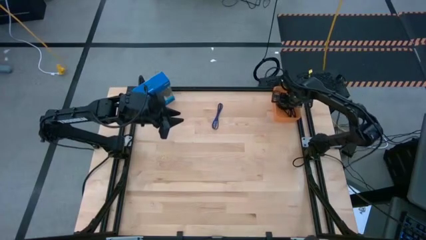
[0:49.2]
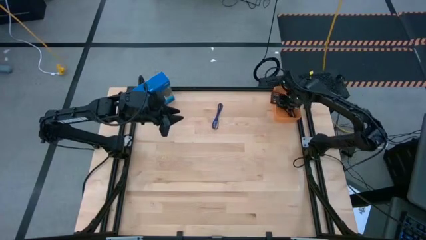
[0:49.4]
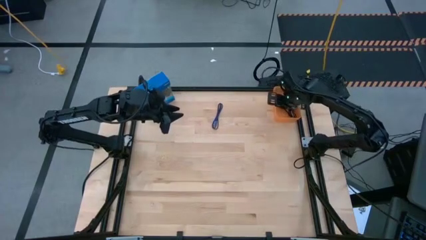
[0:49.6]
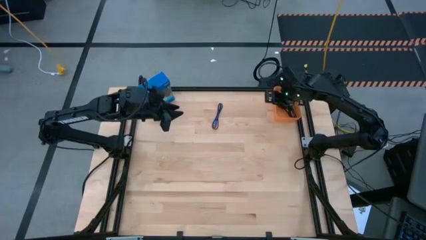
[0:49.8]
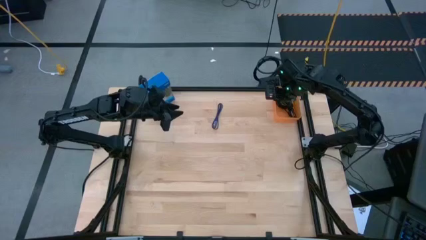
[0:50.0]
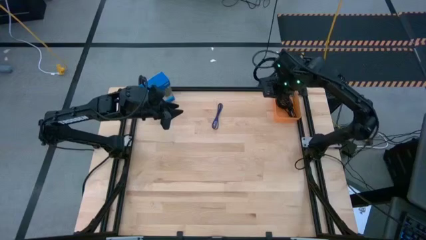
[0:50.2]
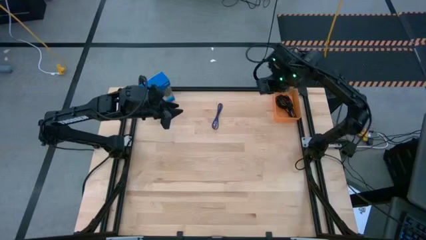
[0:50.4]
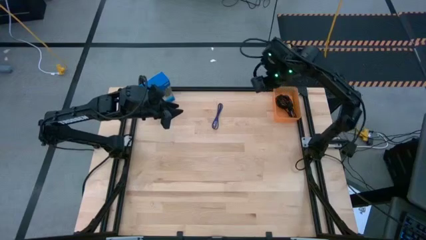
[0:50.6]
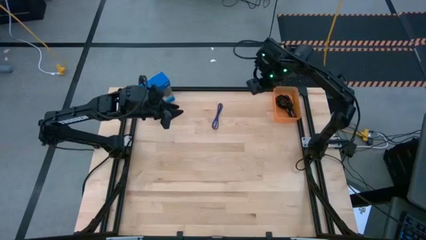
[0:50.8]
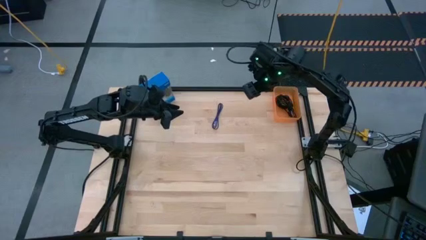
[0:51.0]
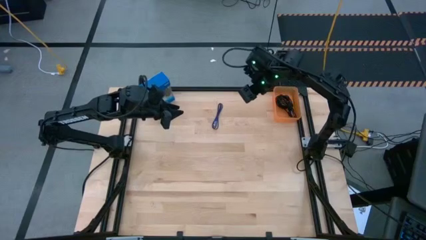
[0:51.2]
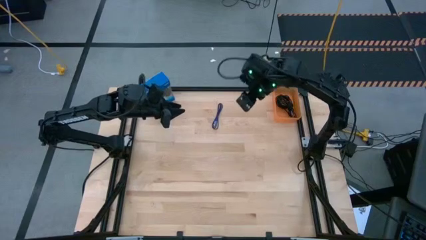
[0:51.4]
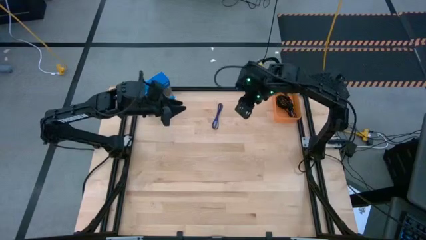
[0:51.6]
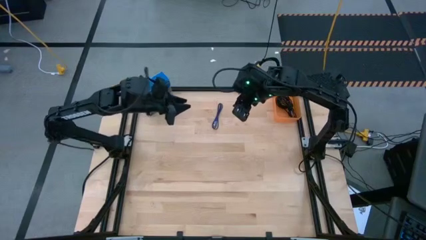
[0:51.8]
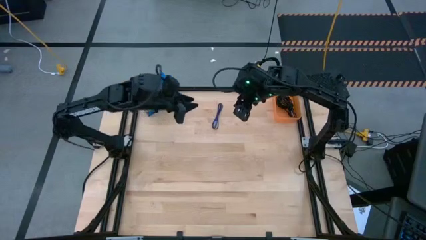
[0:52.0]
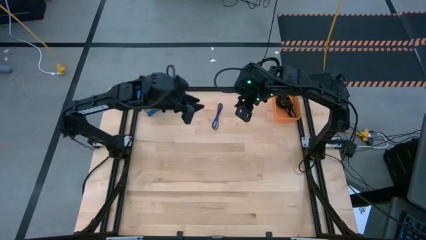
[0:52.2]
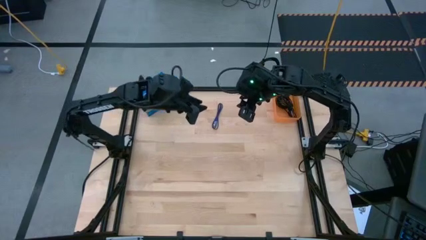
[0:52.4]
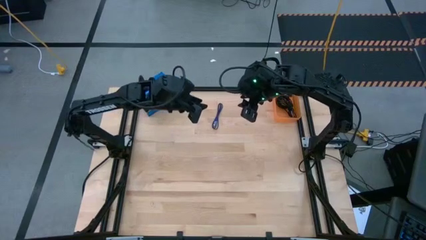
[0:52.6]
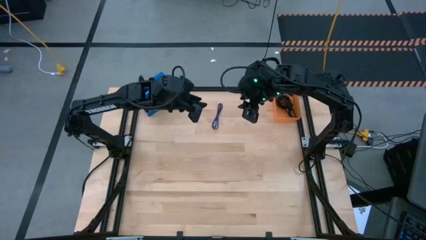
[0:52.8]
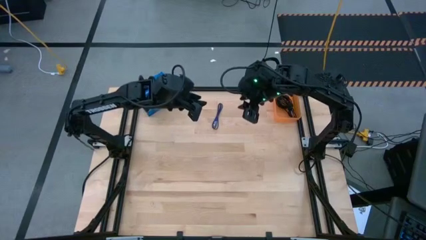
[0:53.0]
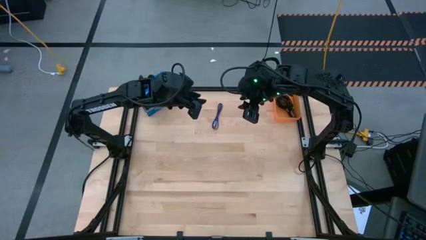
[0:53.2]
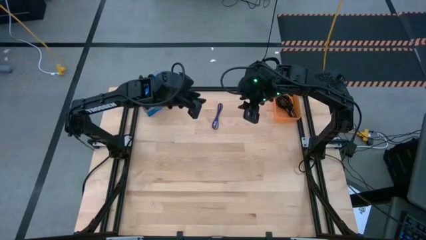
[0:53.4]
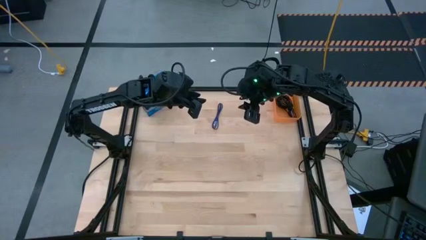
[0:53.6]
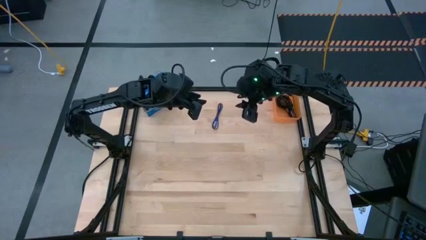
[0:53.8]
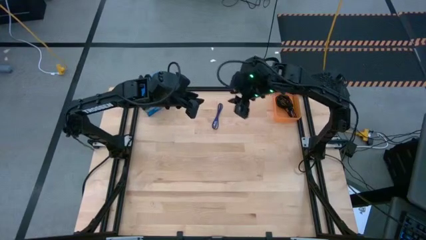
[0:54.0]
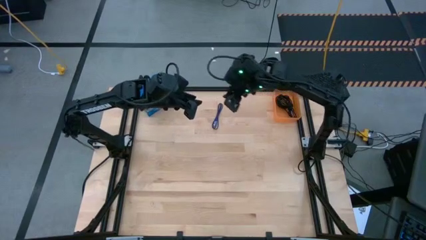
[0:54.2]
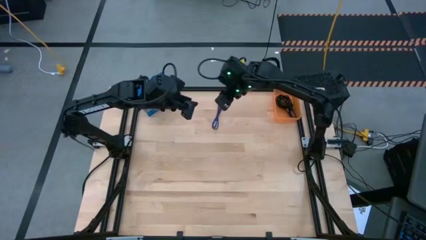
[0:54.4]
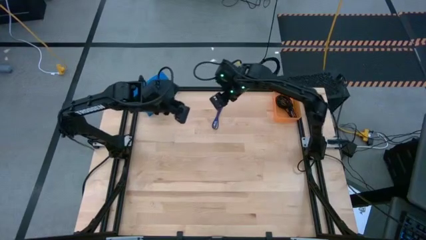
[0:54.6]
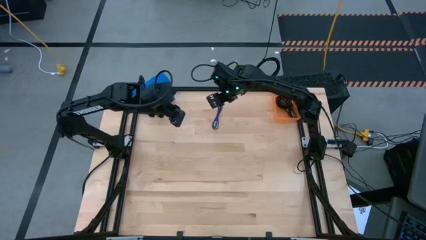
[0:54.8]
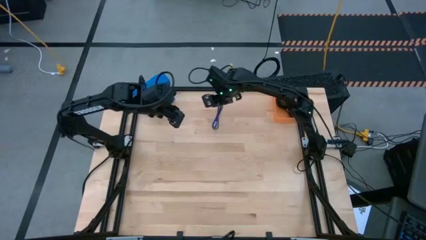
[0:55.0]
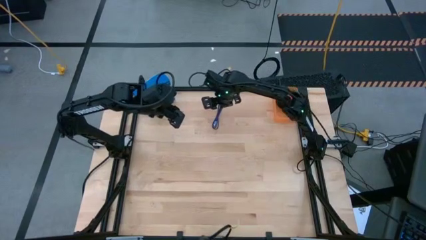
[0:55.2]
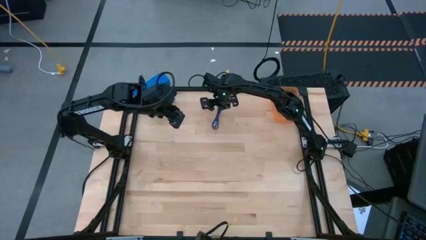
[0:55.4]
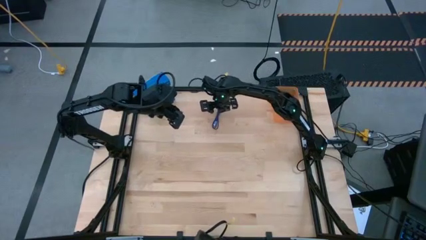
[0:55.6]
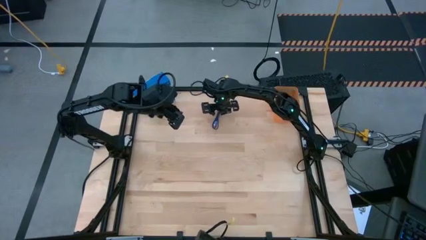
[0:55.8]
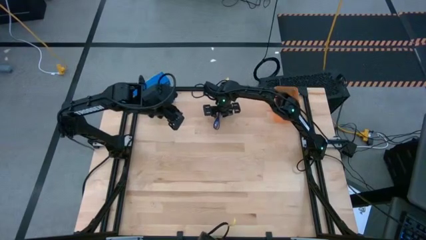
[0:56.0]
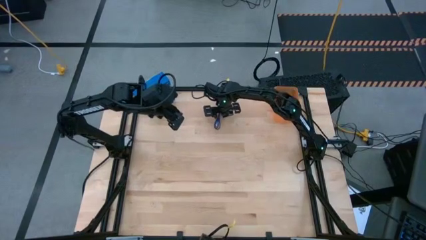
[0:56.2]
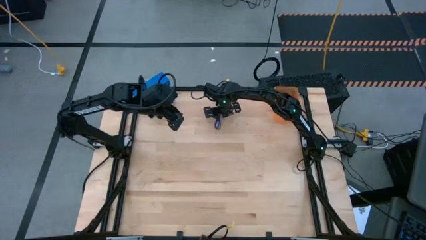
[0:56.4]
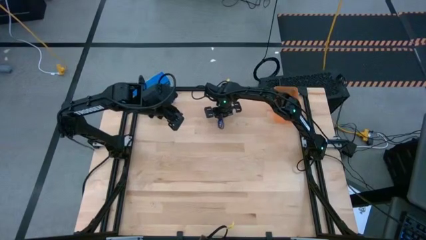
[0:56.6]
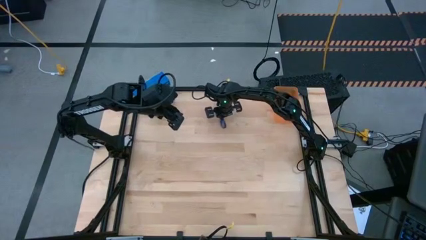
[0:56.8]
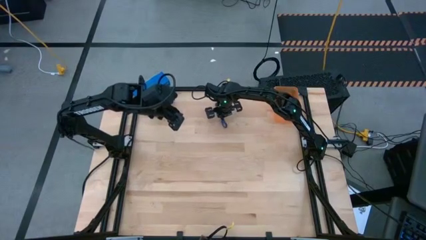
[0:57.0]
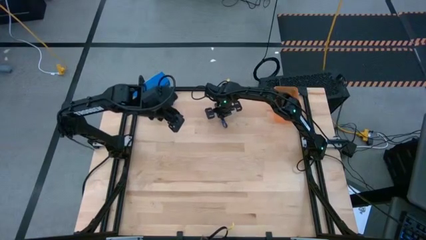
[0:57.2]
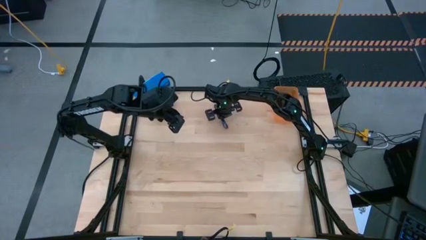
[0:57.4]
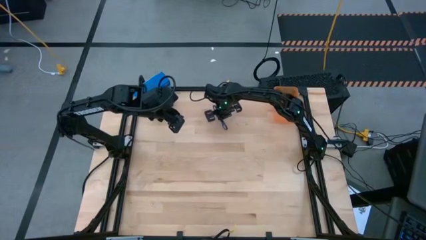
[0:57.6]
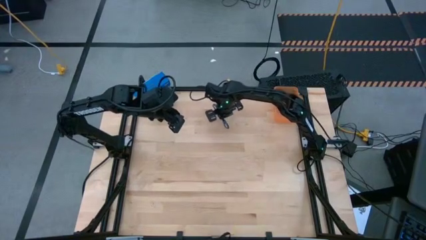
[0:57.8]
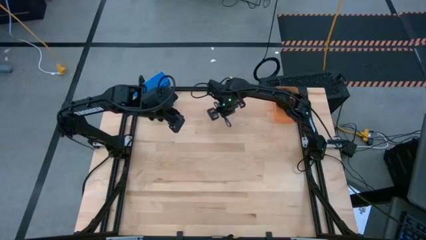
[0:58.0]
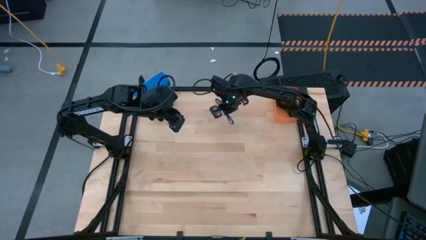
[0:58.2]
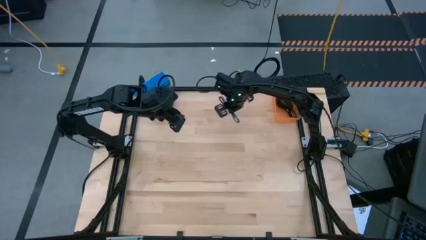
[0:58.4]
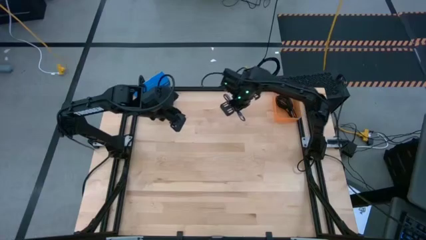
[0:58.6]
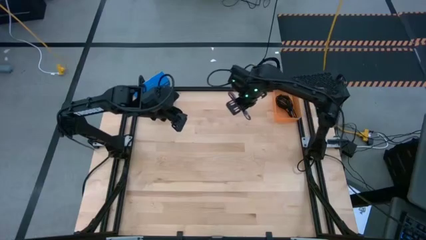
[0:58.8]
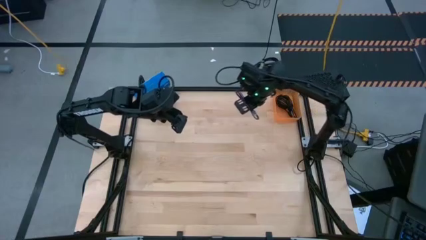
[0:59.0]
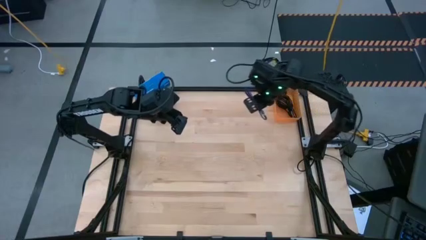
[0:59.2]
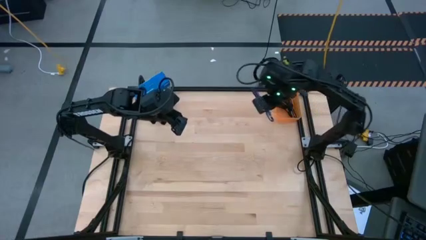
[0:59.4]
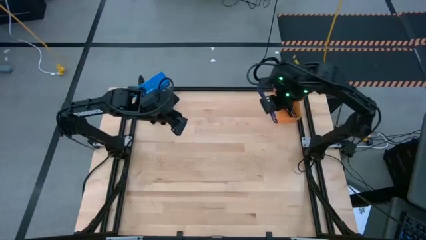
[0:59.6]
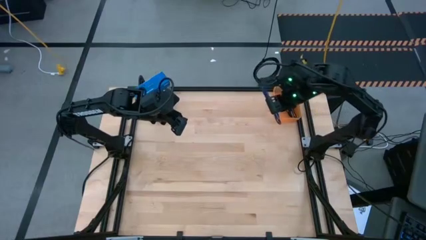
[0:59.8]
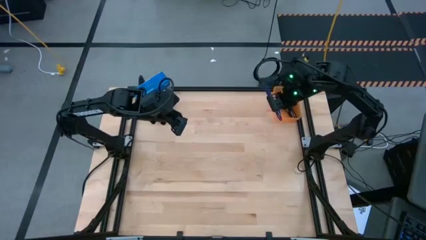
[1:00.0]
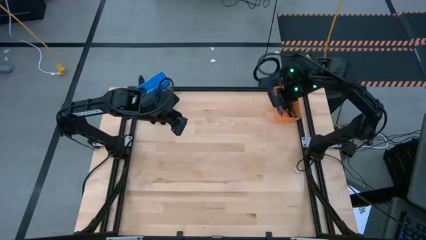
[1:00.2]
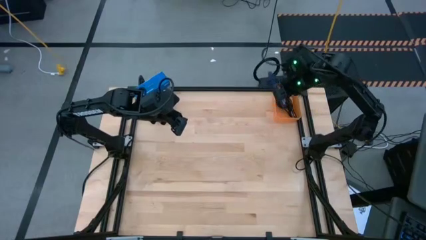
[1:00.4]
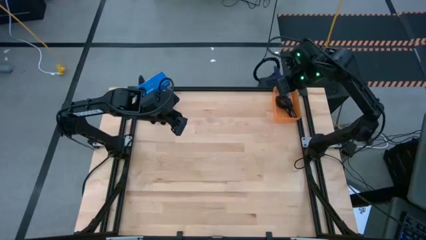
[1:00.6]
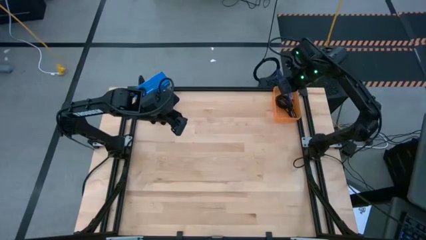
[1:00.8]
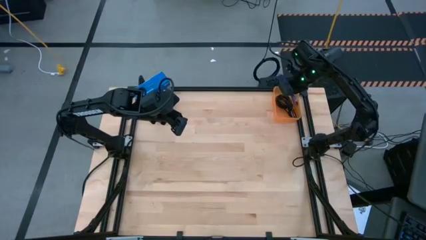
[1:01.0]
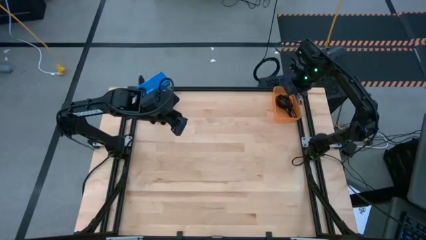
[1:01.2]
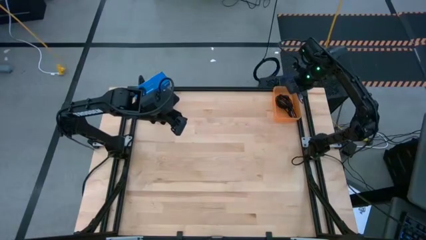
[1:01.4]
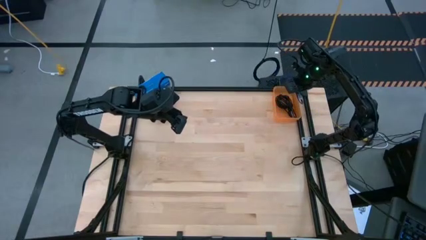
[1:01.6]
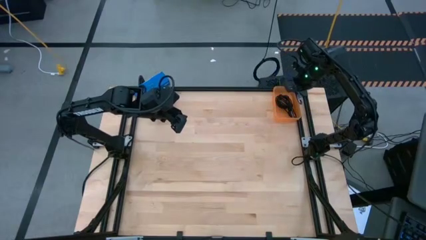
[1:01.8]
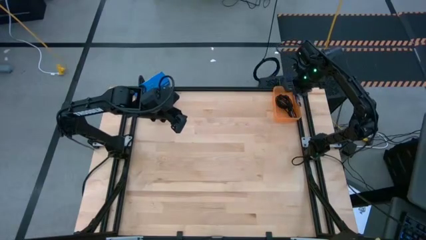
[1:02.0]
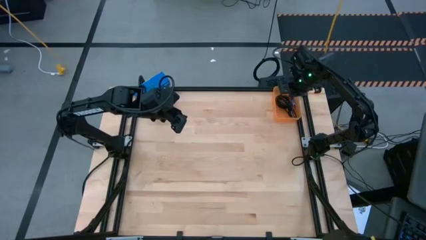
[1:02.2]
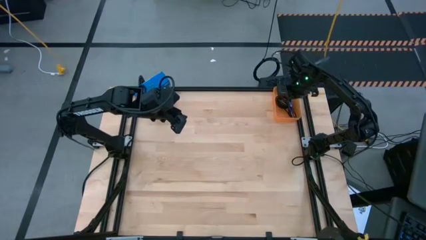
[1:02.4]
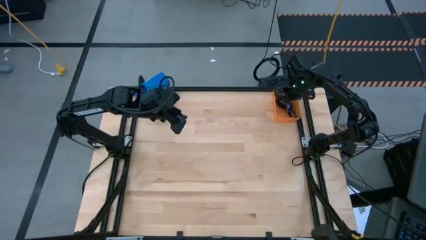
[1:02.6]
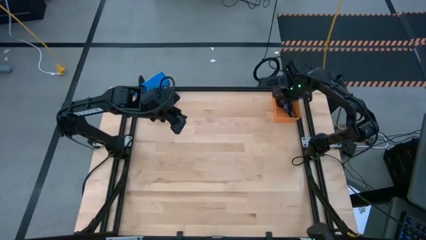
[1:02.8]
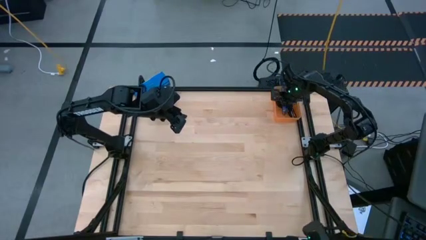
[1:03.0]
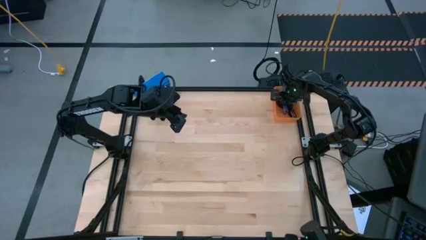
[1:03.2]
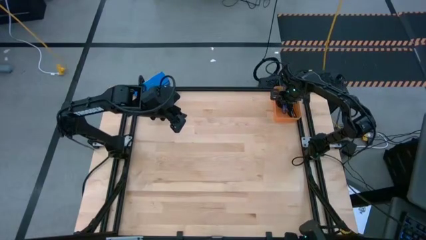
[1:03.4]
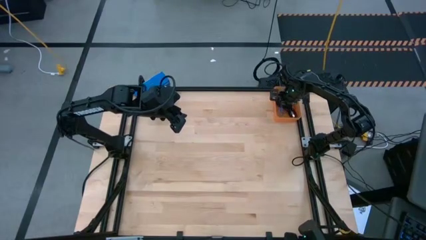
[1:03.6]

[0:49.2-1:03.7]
Task: Pick and place USB-C Cables
Put the blue charger cable into the orange bin
